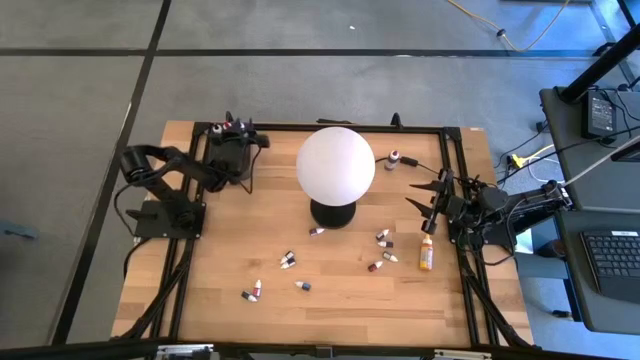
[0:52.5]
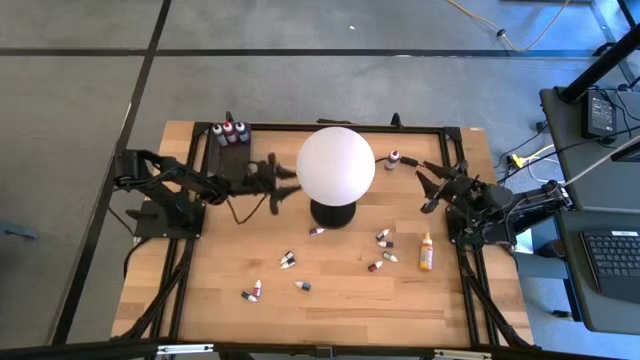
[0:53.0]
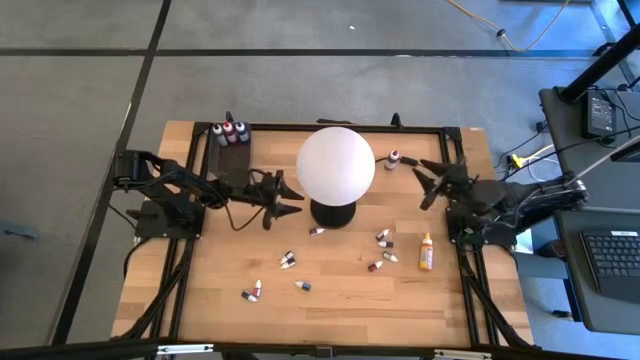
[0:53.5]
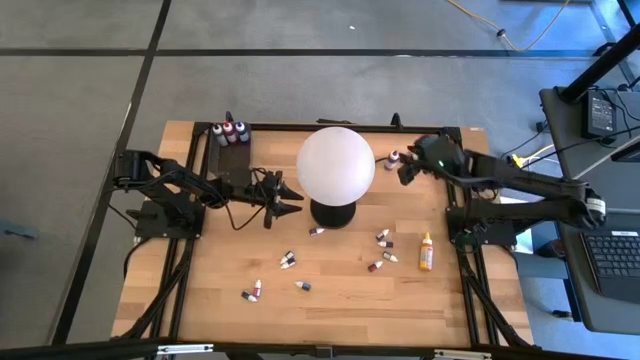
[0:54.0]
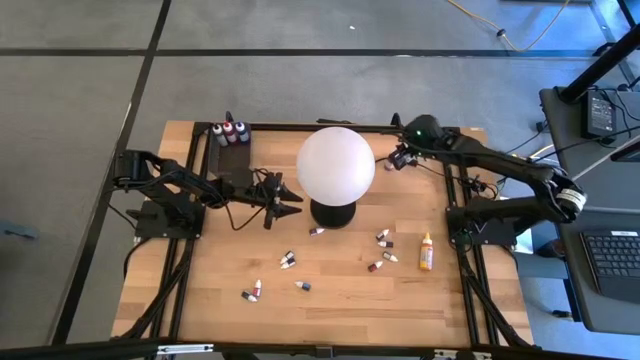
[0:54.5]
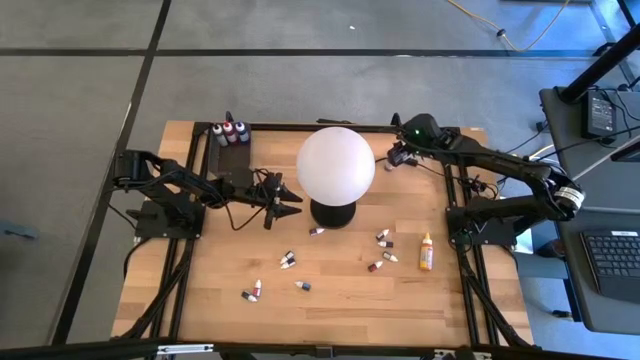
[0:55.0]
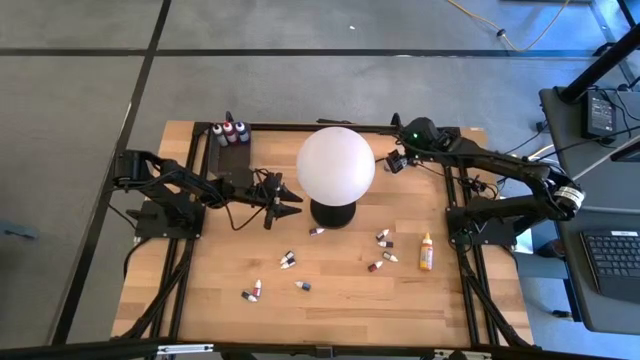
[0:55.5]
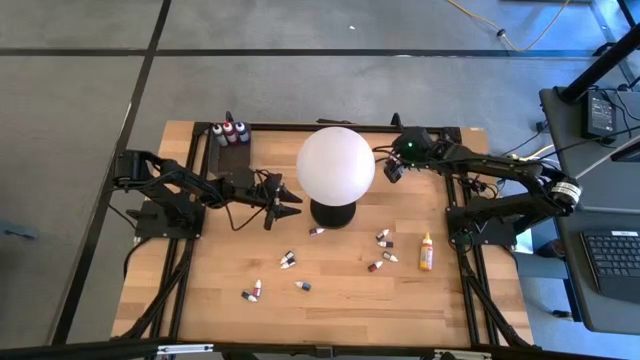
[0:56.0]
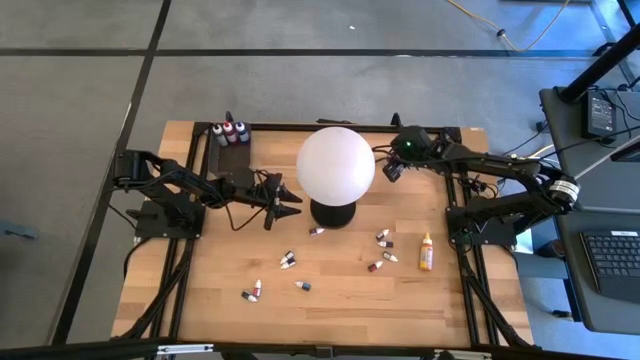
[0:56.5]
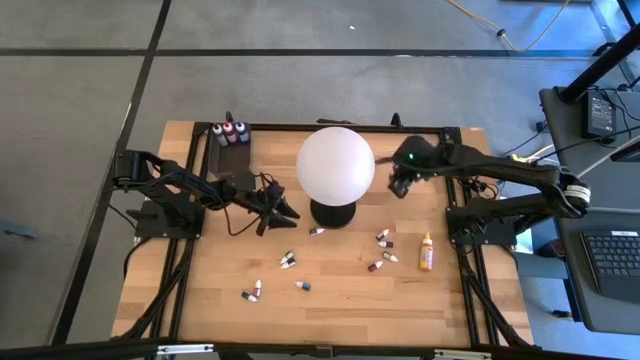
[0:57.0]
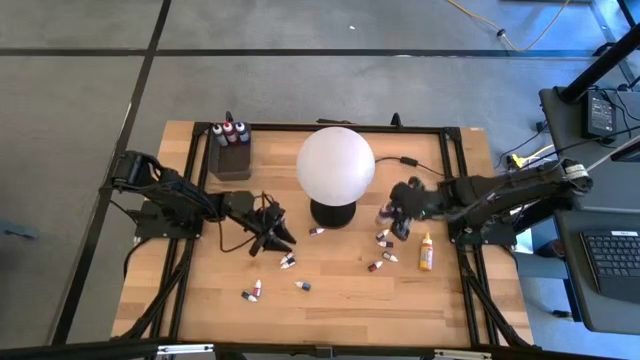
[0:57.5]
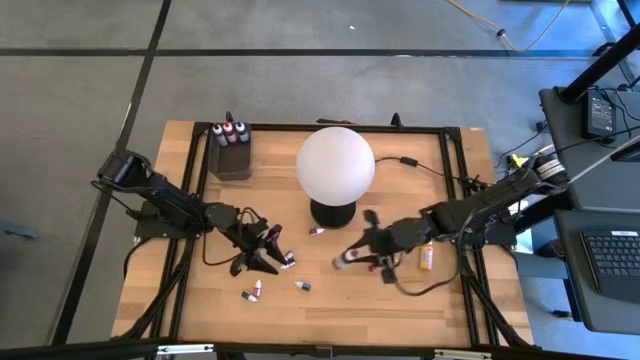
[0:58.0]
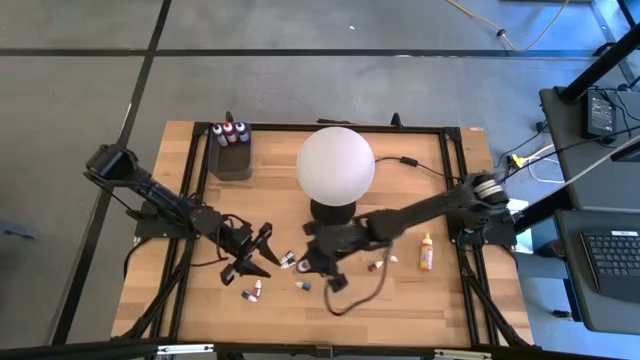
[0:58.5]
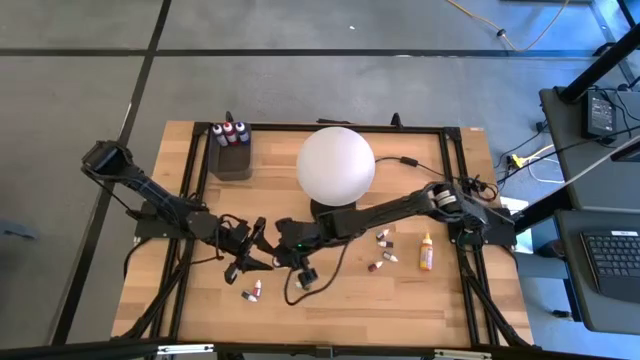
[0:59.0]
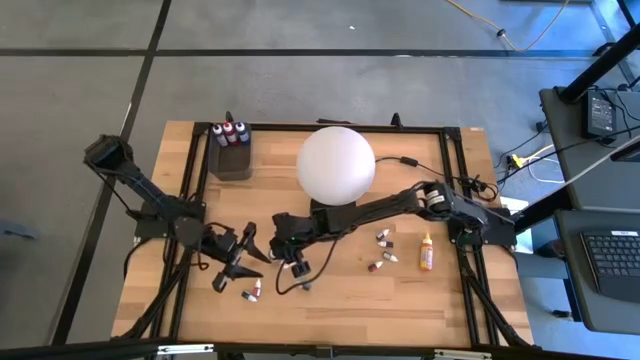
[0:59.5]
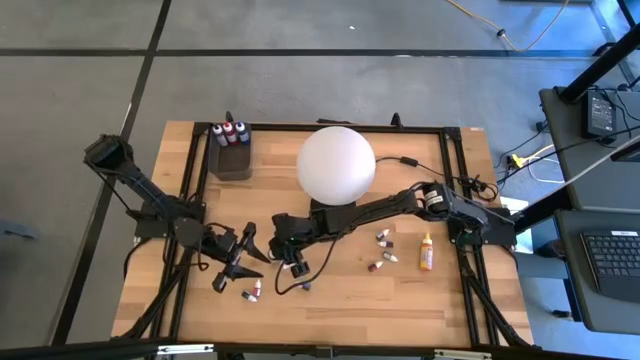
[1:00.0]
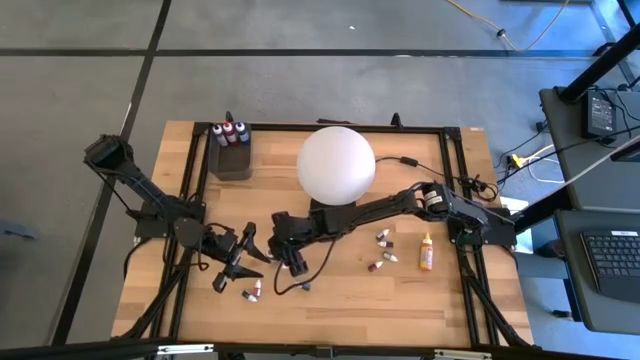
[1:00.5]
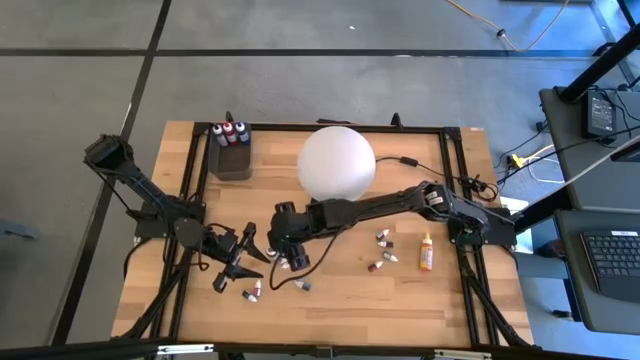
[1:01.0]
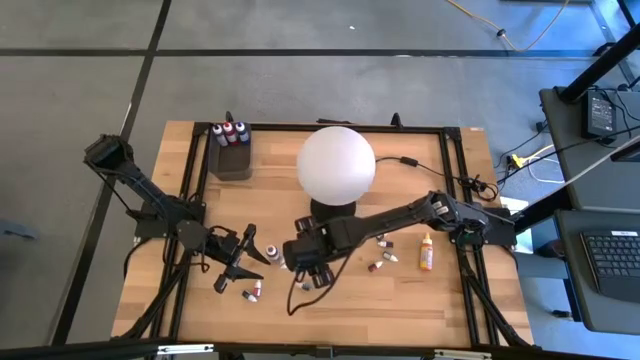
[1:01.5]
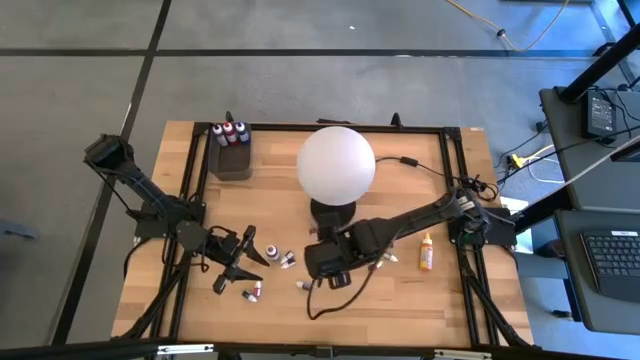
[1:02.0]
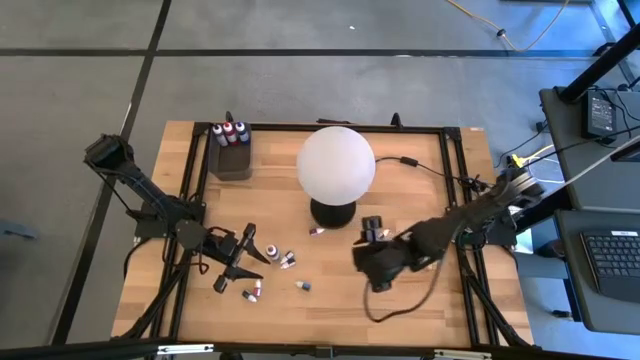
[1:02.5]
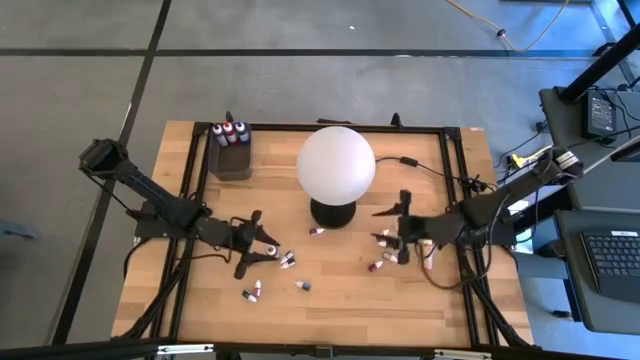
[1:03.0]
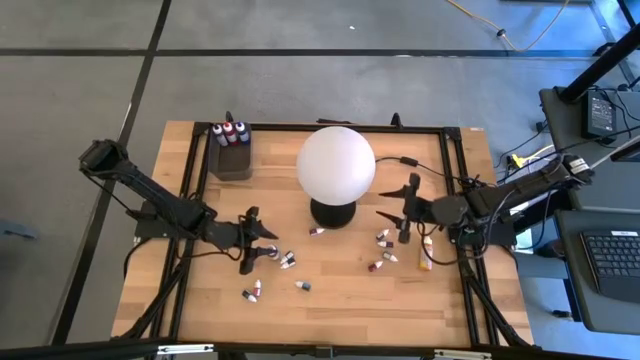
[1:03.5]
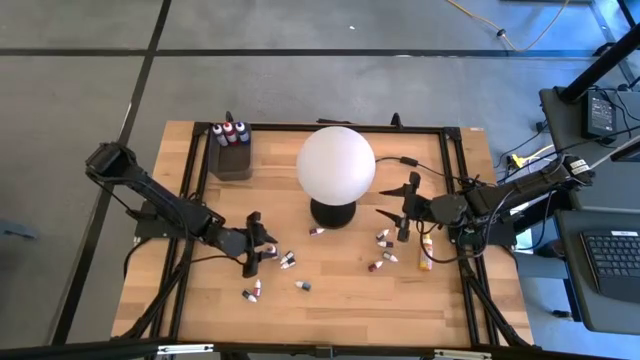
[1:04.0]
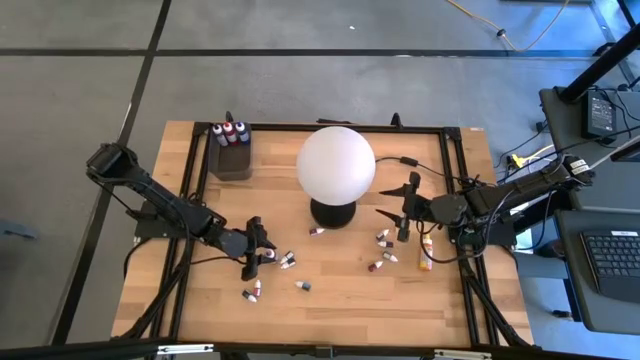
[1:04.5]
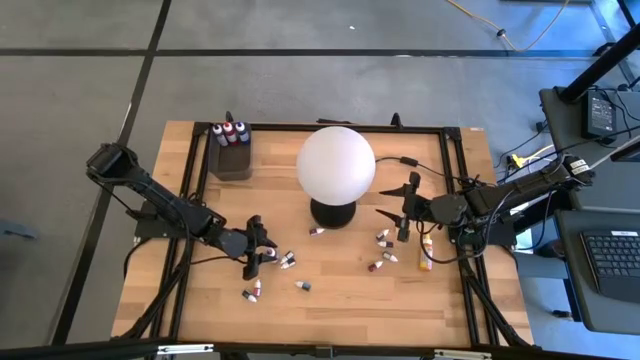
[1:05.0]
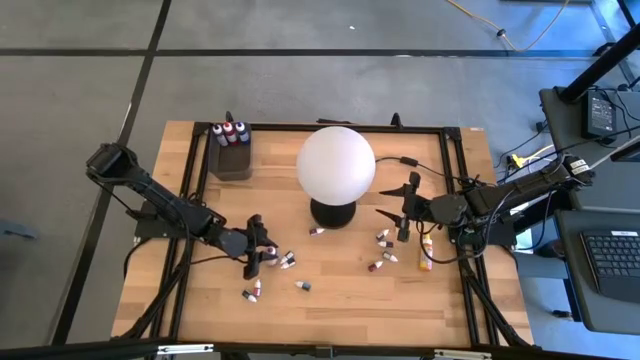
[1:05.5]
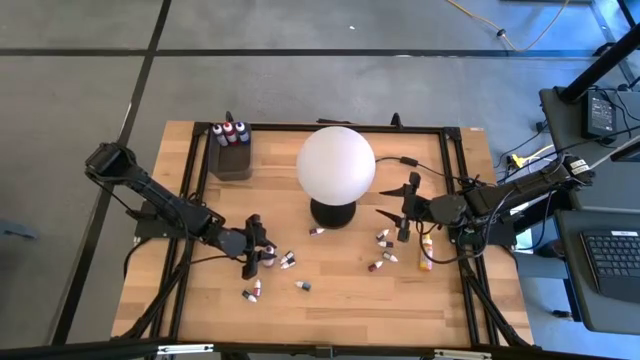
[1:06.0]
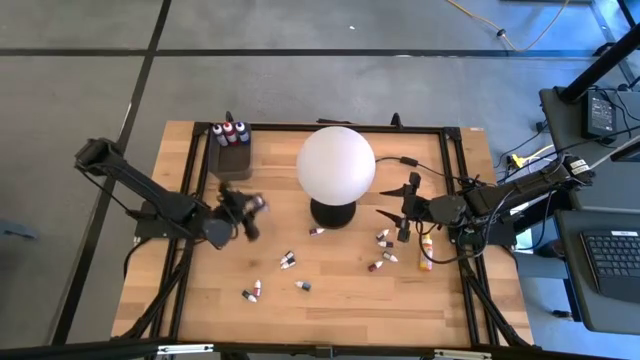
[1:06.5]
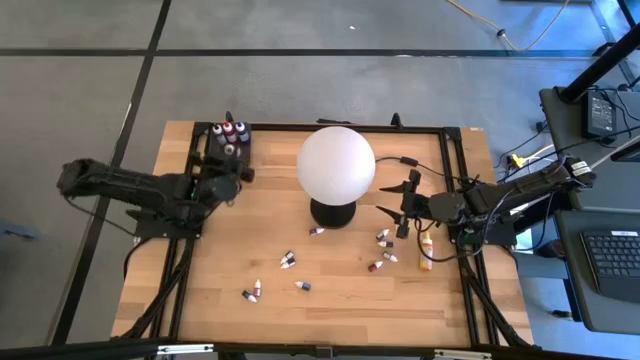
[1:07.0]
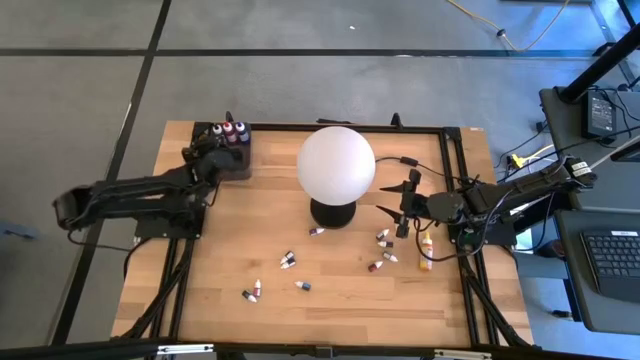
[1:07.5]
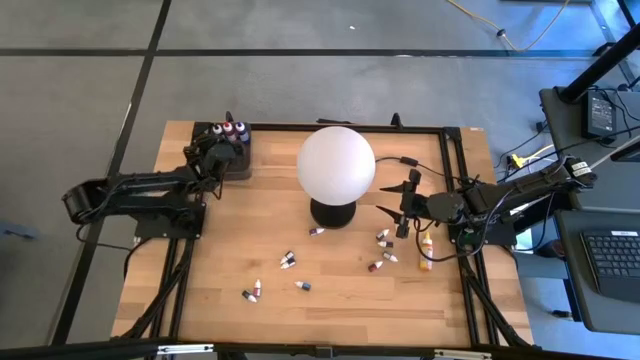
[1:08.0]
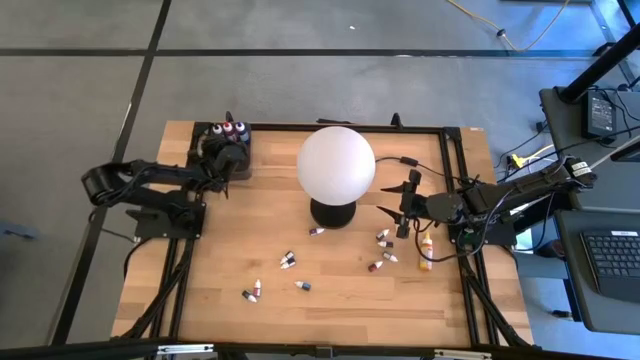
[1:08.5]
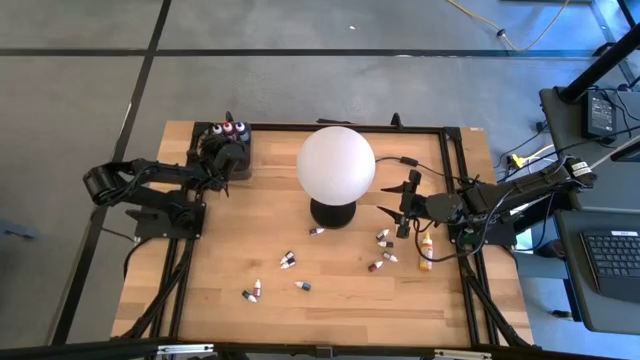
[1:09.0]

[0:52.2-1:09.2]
Task: Pick & Place food coloring
Put the big violet food coloring bottle into the black container

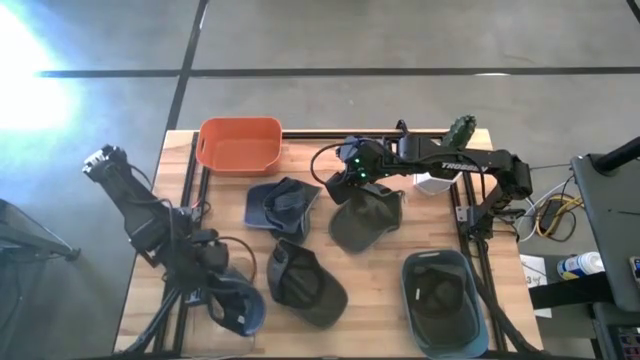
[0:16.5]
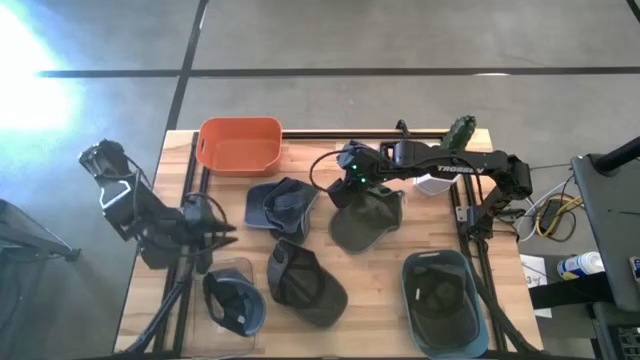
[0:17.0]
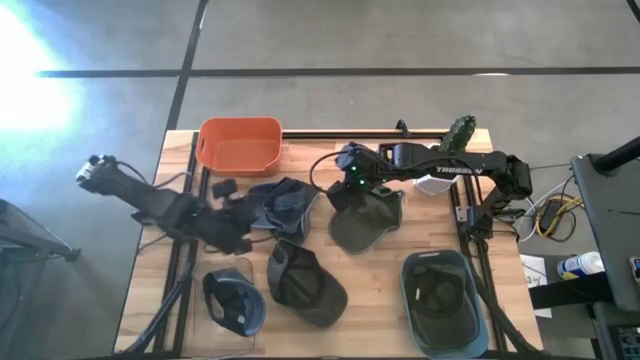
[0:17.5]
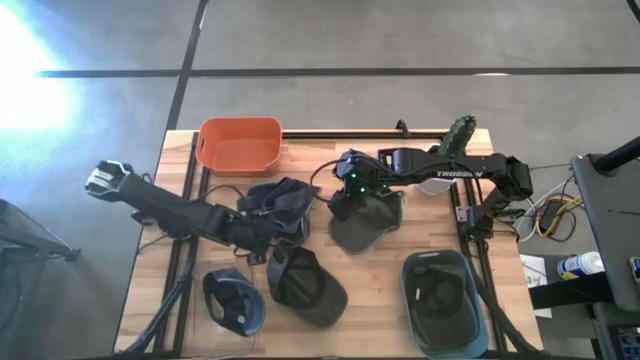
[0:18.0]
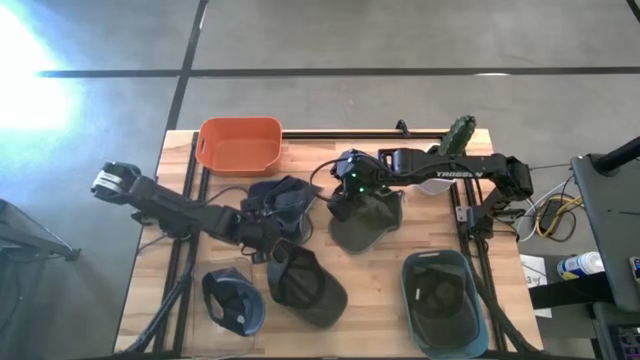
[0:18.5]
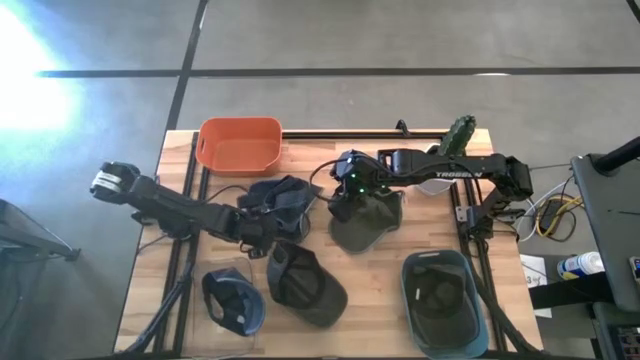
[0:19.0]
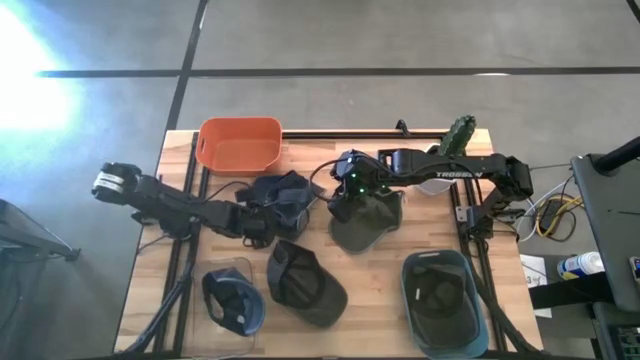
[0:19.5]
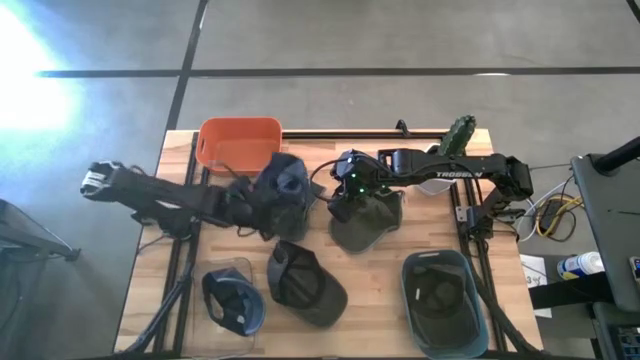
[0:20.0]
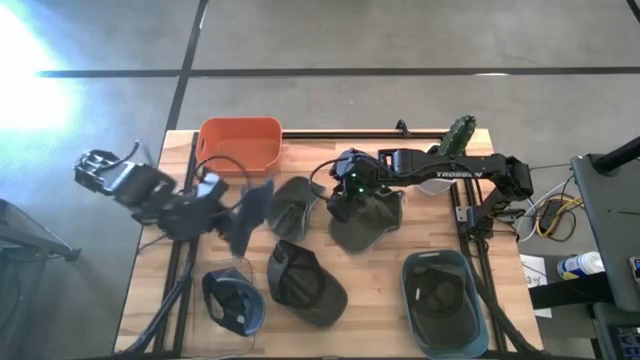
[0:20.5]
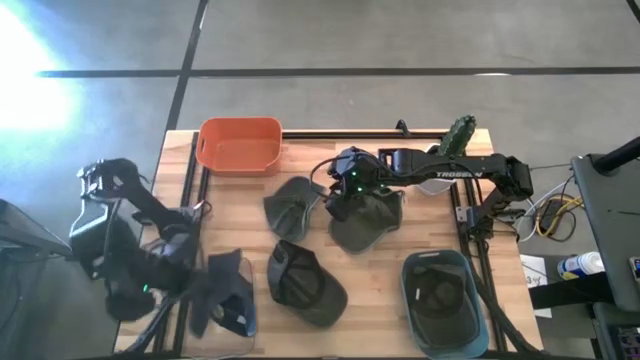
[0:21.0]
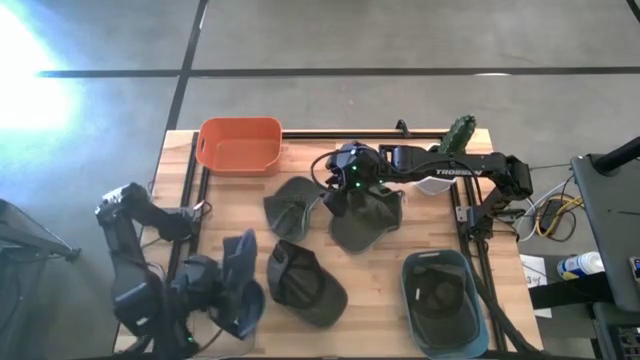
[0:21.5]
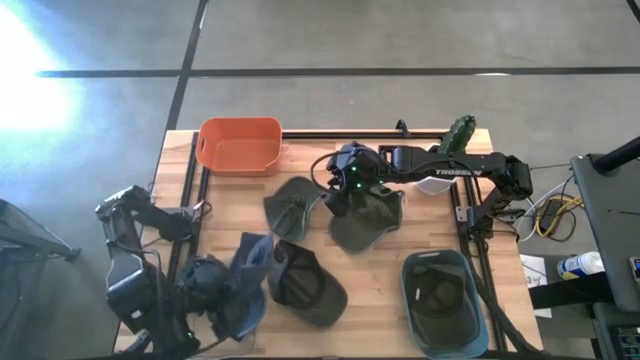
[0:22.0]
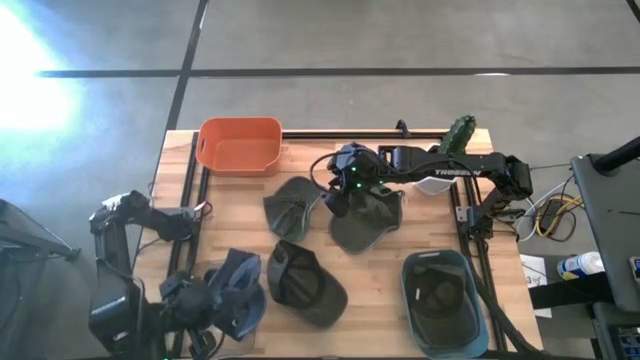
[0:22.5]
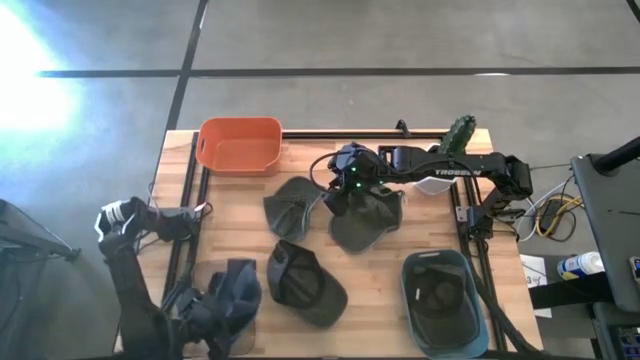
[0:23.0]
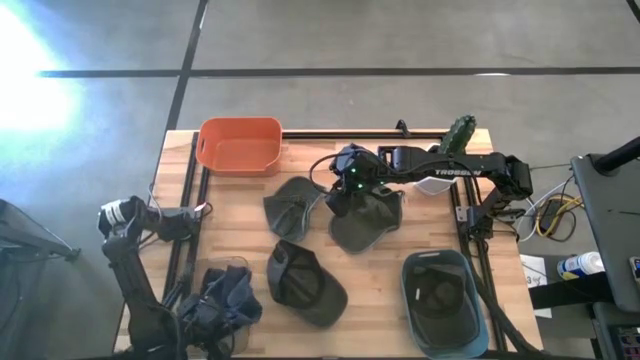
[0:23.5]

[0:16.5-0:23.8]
Task: Pick & Place hat
Put the blue cap into the transparent bin
